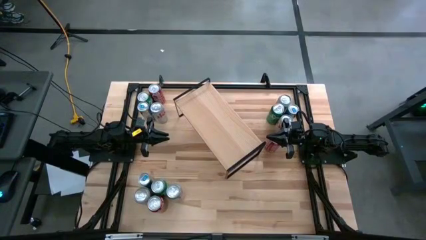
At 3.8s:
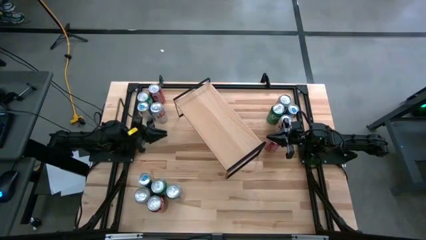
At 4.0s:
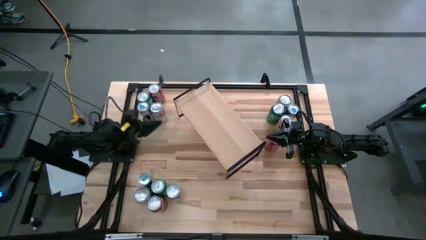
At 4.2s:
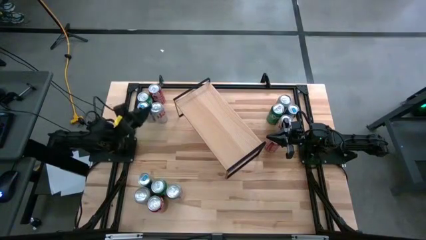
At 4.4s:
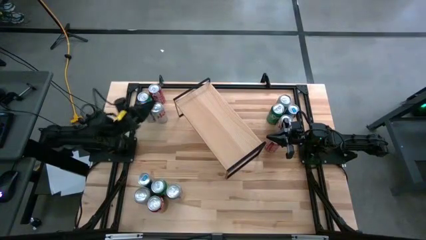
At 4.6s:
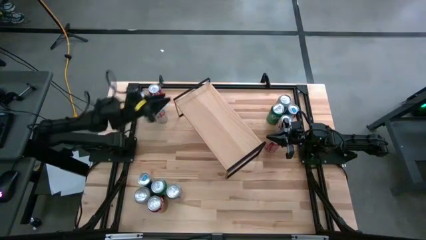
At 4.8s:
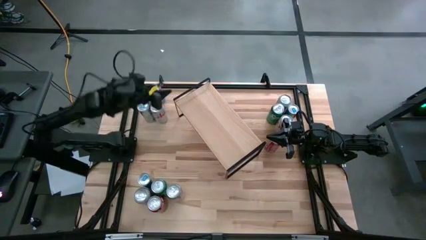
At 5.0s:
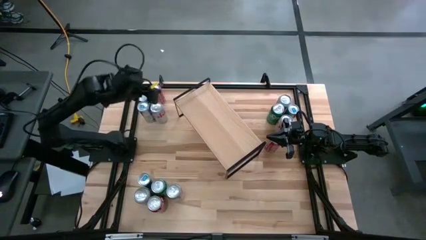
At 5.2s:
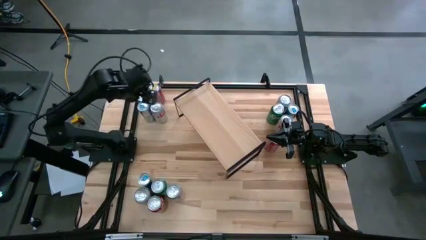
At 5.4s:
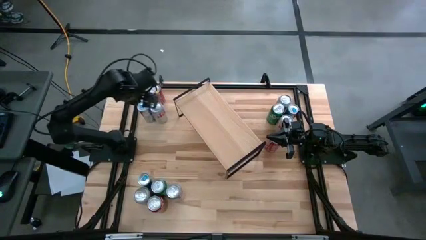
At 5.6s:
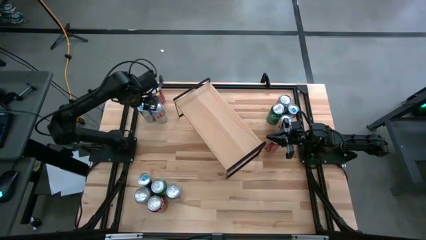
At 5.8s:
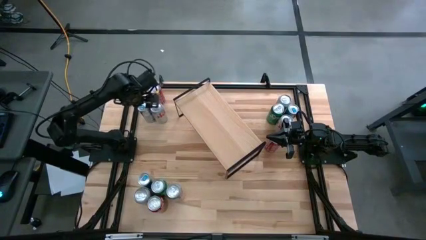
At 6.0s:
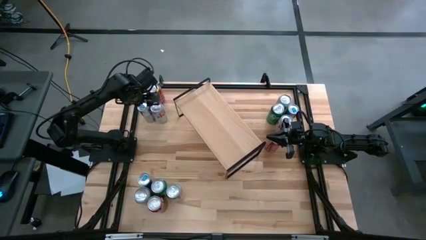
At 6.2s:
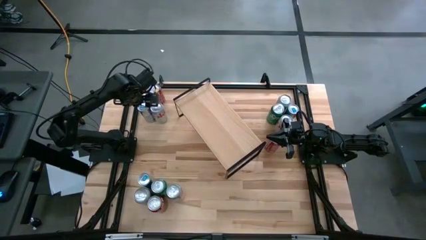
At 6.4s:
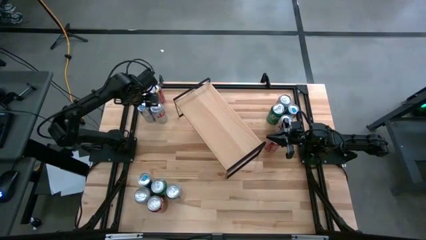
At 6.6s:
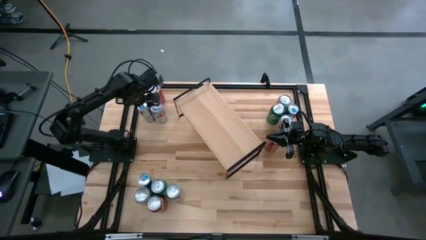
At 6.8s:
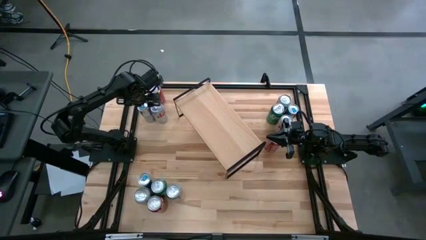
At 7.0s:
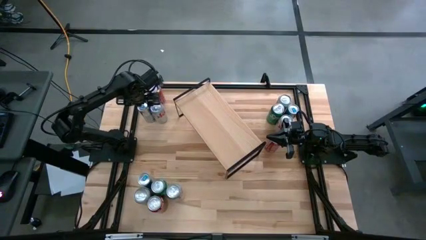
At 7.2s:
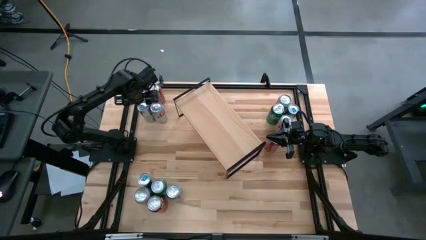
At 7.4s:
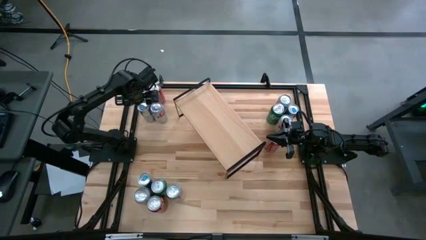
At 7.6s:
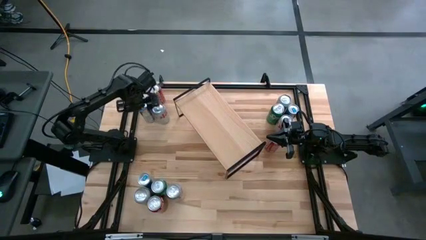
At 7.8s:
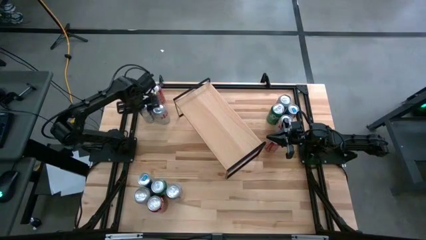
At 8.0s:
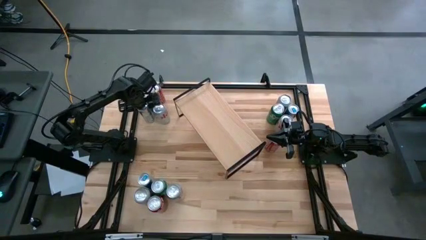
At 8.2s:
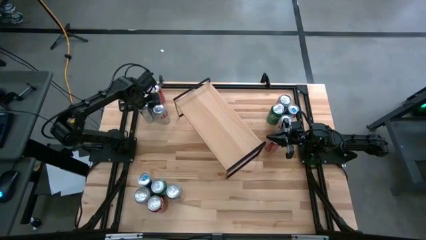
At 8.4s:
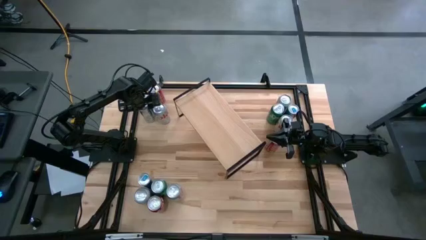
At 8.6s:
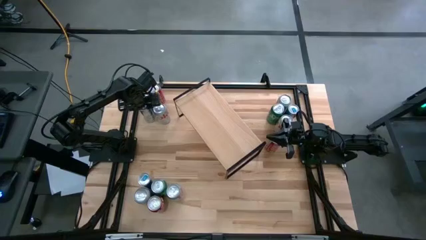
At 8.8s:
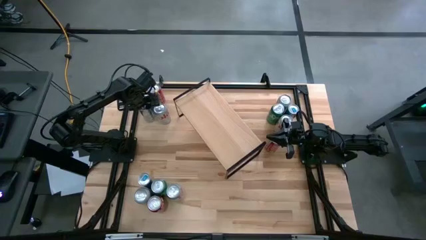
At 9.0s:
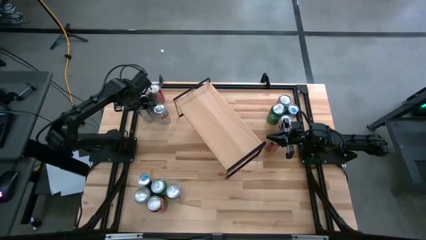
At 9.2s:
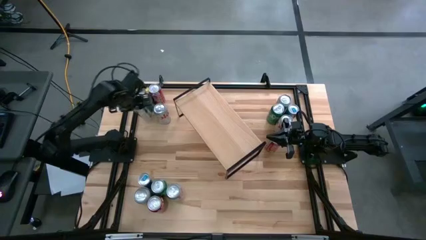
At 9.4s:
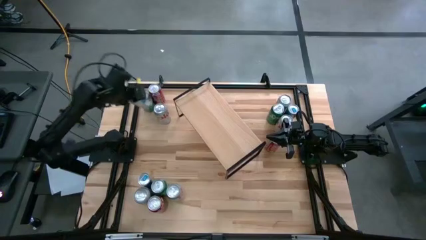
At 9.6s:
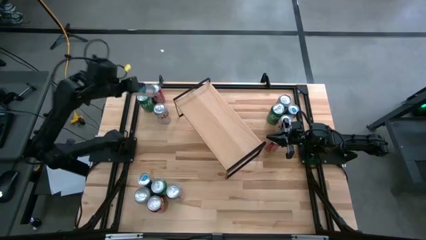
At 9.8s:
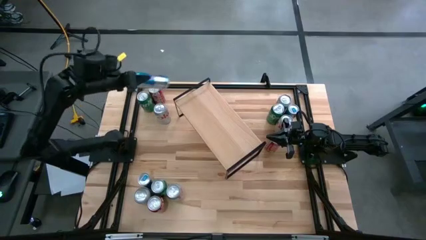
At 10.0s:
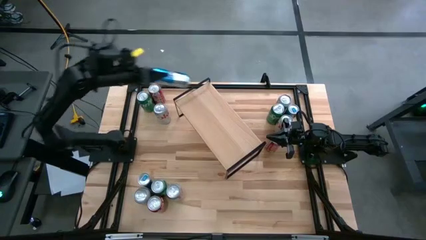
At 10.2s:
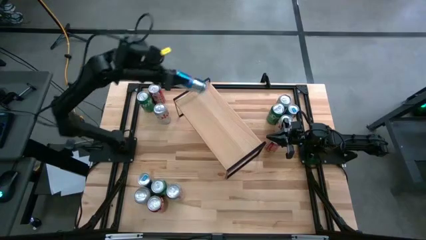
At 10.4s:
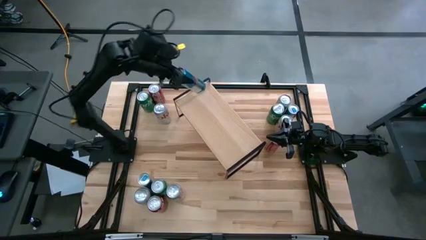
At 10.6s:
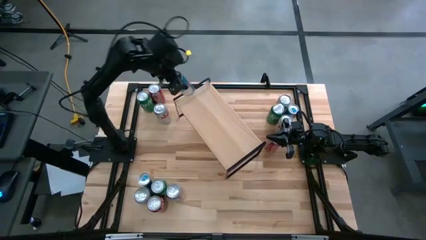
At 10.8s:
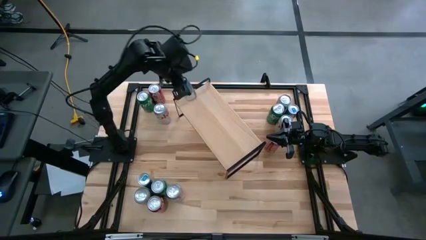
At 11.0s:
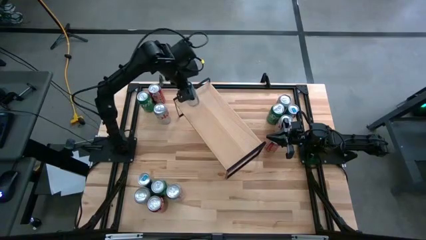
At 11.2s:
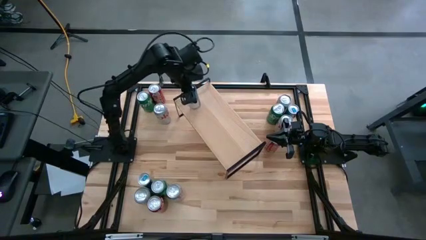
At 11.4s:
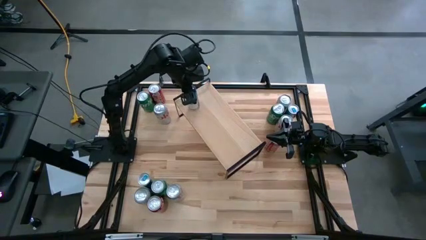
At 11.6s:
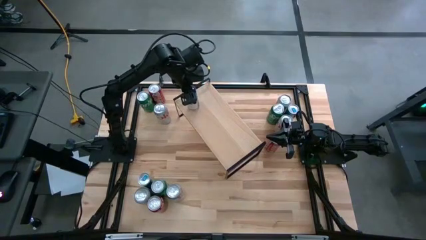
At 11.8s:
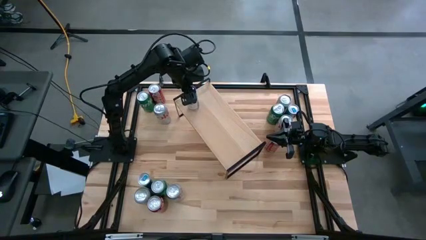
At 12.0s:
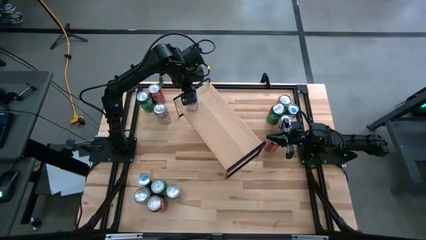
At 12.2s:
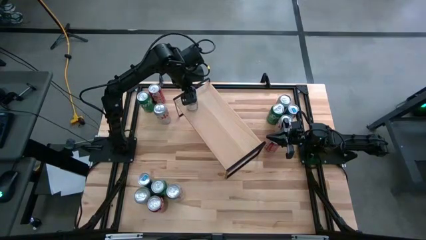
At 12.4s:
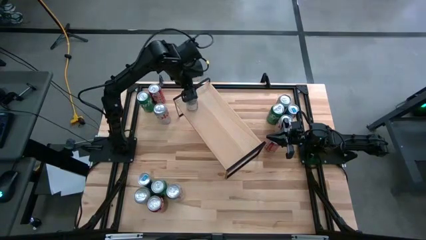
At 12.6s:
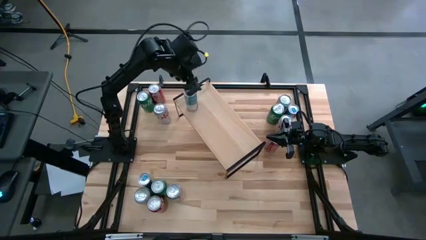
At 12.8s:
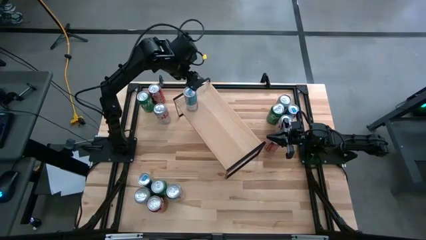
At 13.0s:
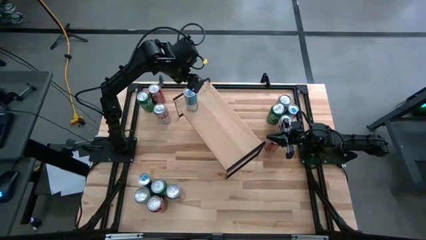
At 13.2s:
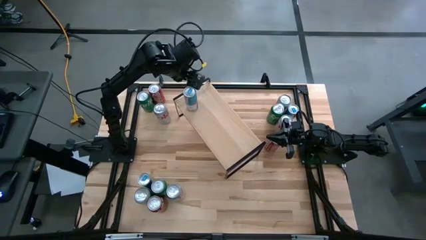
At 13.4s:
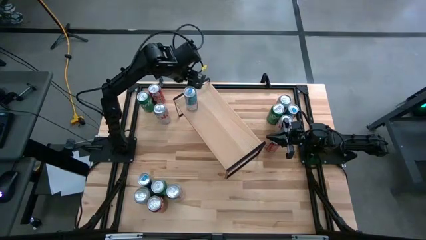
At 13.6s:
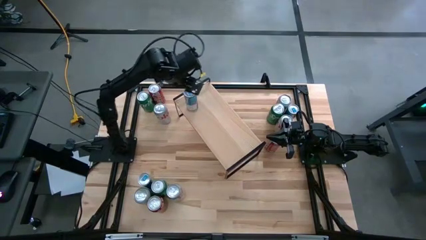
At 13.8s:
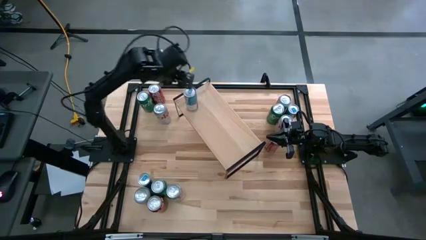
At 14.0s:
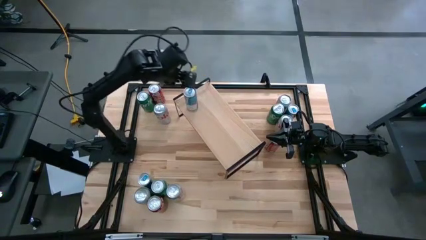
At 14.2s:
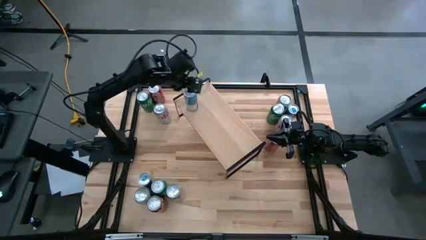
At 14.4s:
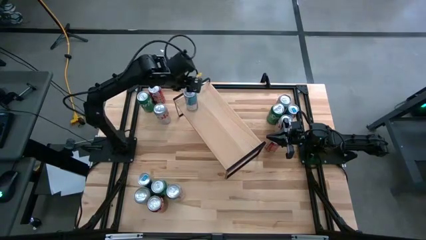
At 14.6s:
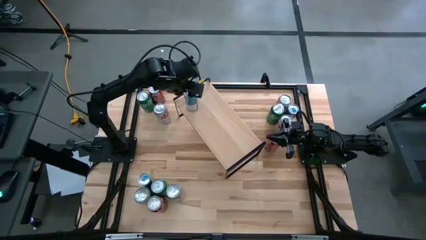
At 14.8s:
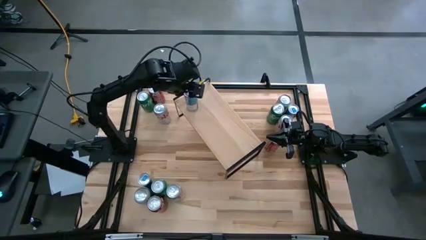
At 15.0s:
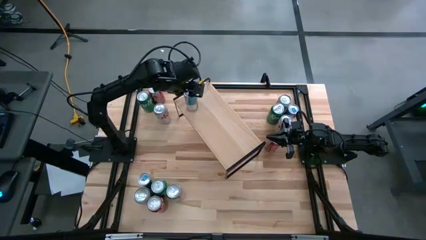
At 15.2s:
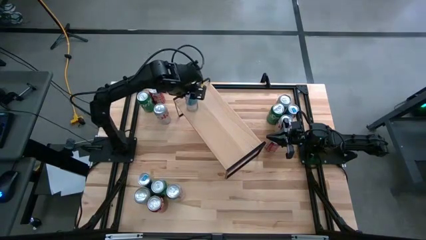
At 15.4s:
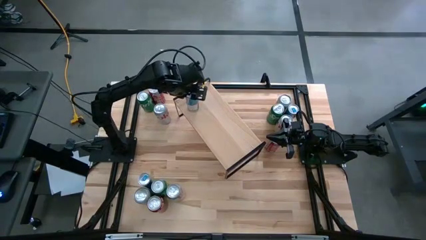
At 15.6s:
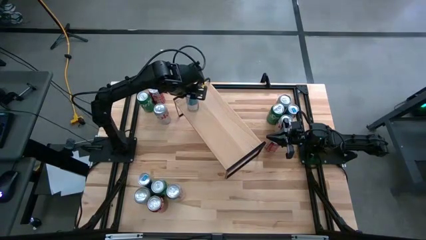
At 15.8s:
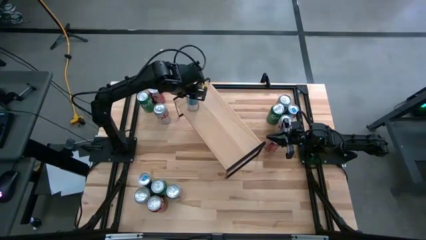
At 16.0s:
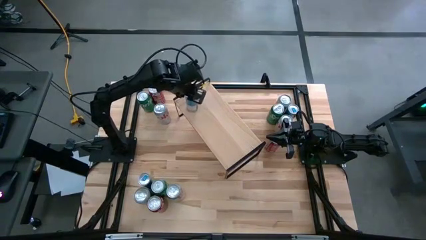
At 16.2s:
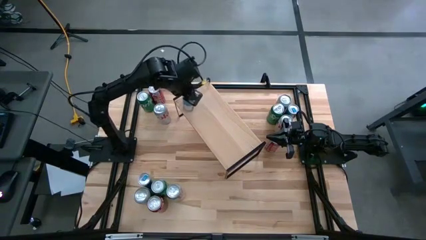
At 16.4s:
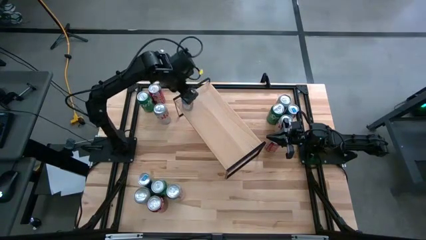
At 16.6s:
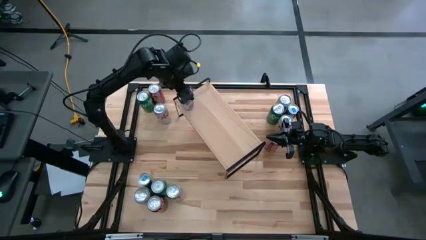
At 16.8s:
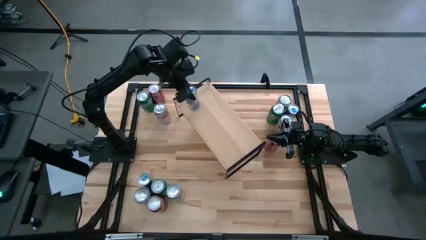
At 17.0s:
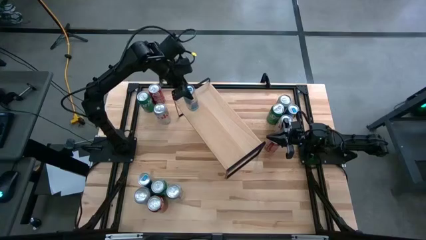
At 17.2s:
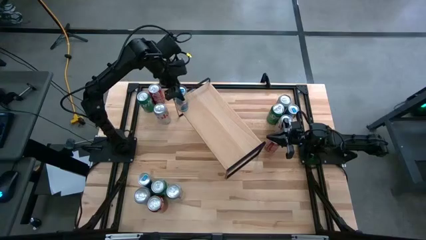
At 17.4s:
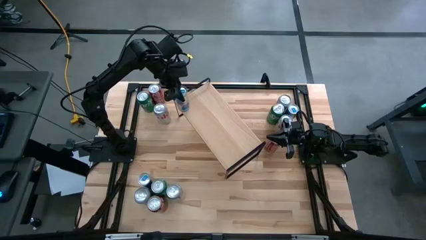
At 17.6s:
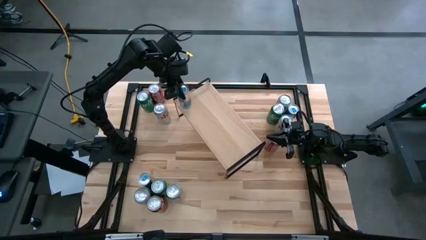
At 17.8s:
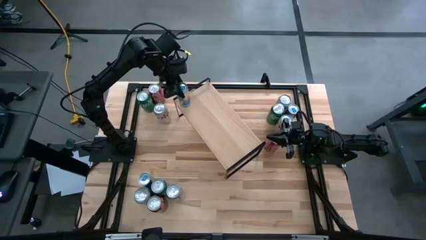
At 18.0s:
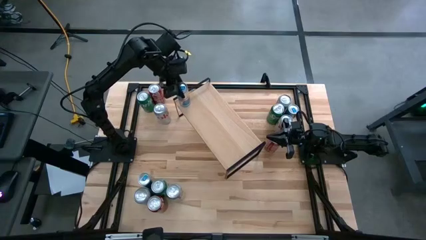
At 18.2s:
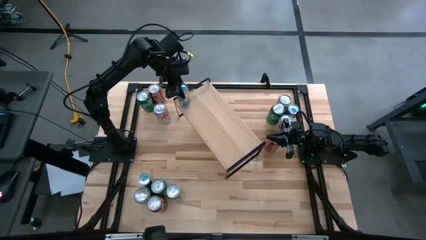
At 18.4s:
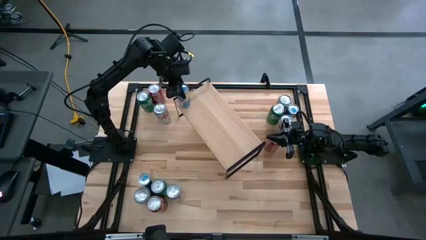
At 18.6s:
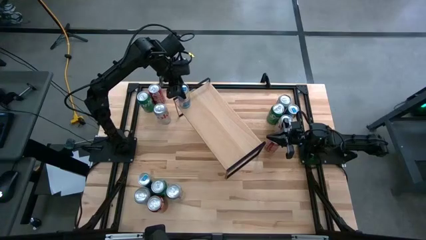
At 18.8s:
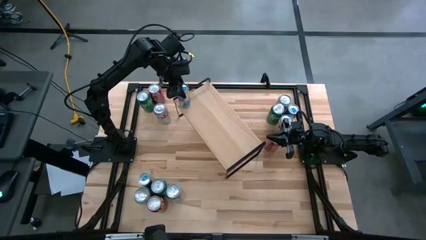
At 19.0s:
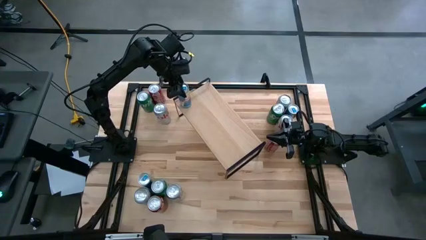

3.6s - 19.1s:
Task: Place canned beverage on shelf
Put the top left blue soda can on the shelf
